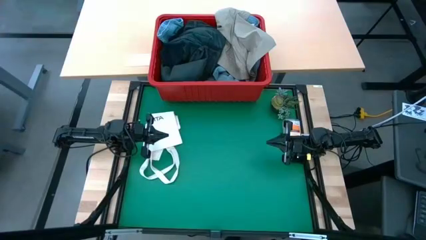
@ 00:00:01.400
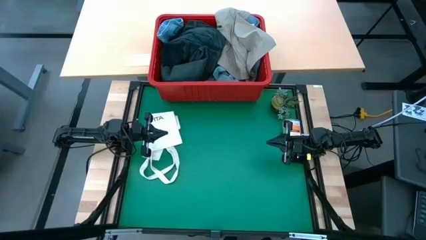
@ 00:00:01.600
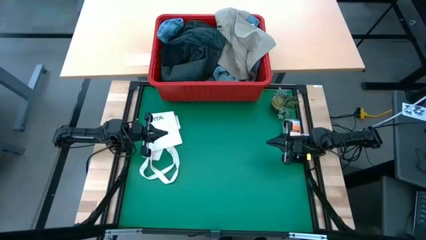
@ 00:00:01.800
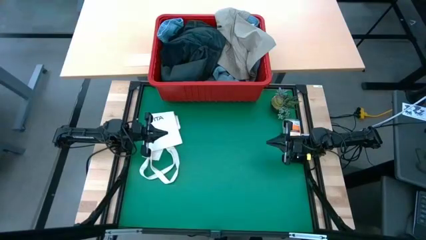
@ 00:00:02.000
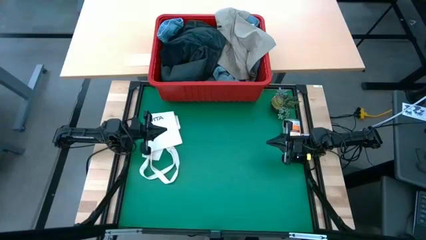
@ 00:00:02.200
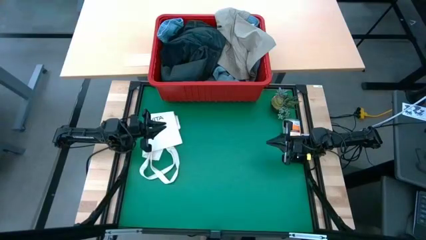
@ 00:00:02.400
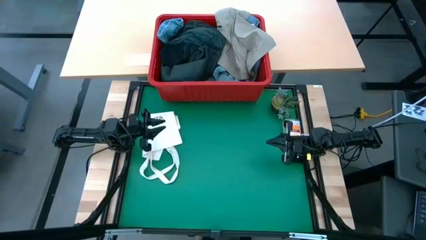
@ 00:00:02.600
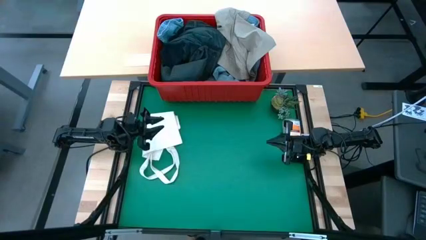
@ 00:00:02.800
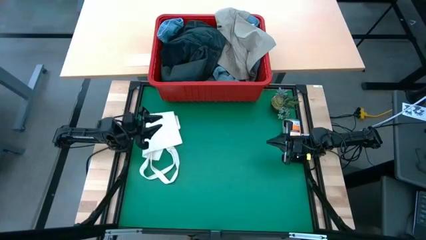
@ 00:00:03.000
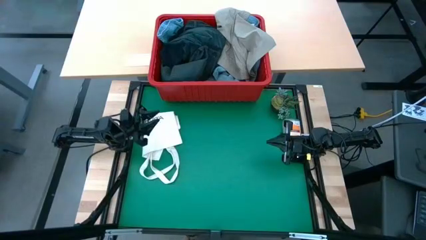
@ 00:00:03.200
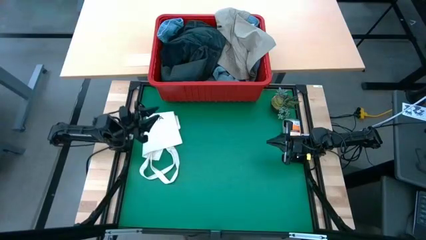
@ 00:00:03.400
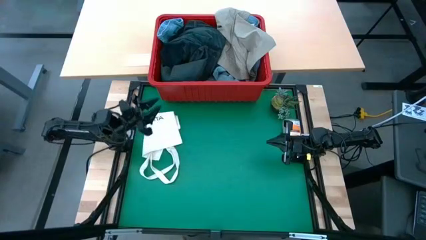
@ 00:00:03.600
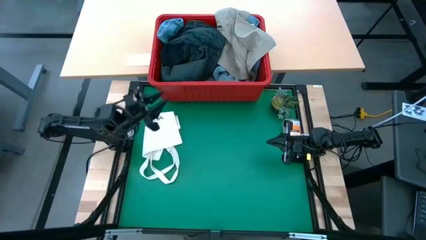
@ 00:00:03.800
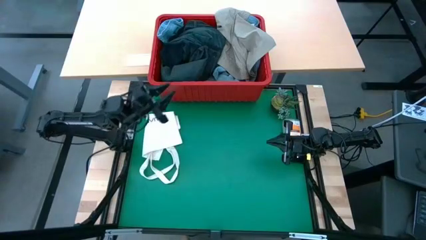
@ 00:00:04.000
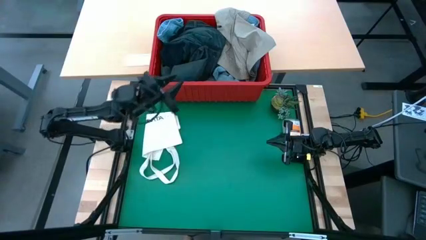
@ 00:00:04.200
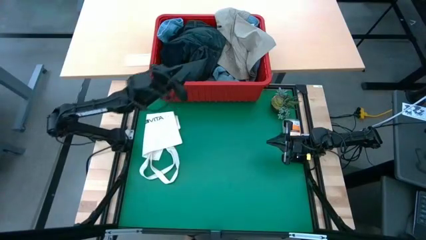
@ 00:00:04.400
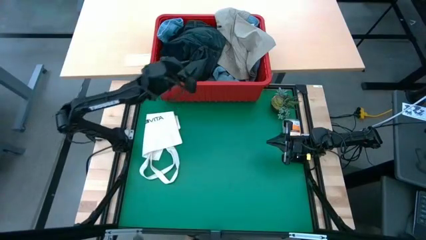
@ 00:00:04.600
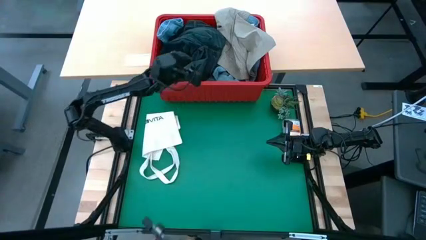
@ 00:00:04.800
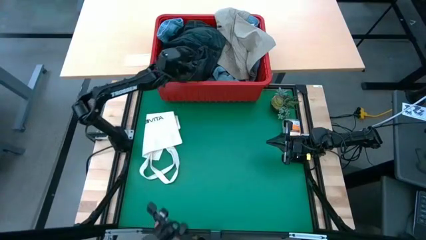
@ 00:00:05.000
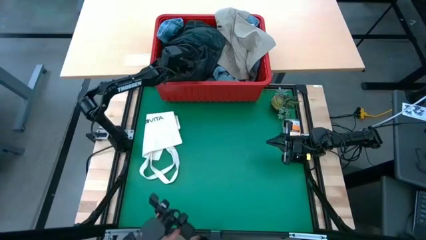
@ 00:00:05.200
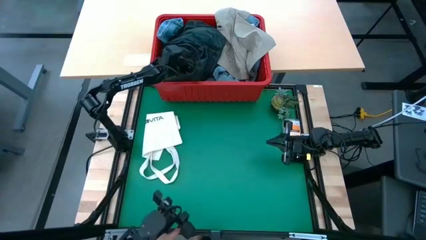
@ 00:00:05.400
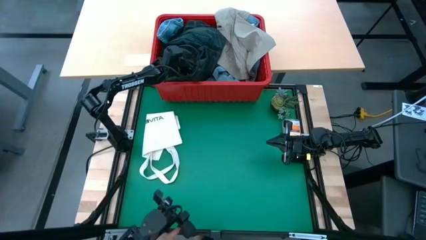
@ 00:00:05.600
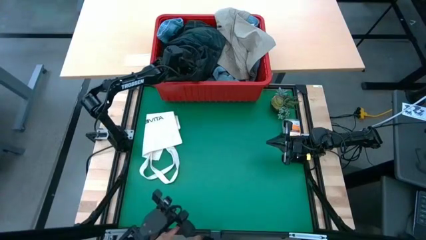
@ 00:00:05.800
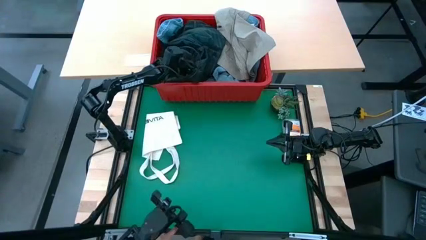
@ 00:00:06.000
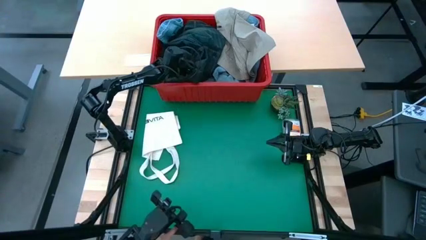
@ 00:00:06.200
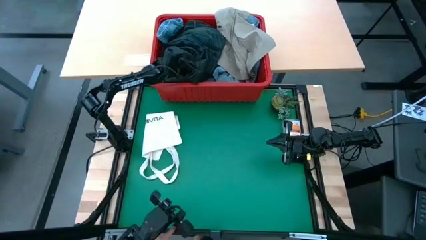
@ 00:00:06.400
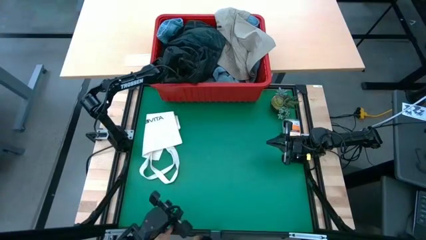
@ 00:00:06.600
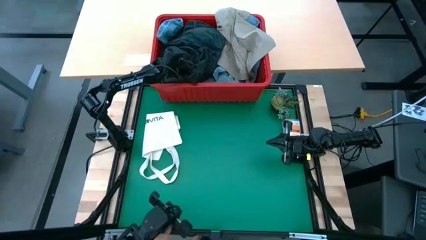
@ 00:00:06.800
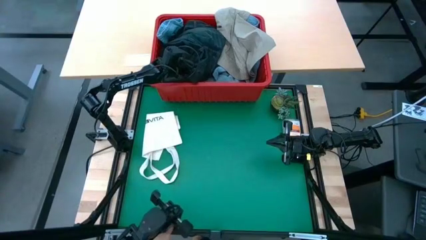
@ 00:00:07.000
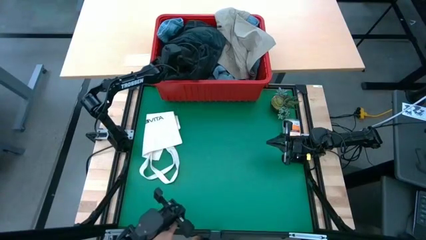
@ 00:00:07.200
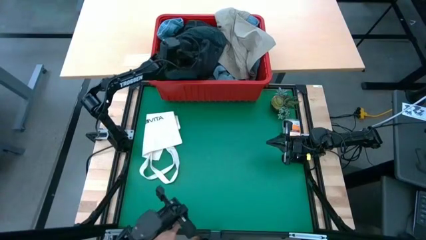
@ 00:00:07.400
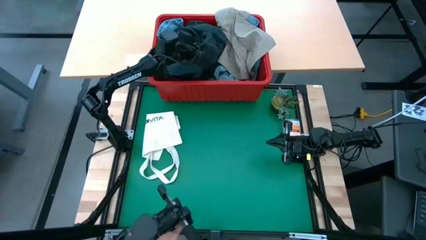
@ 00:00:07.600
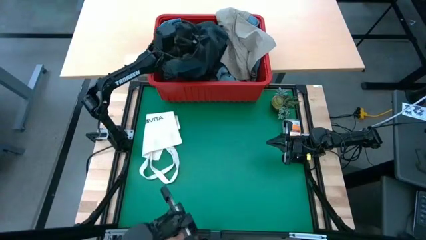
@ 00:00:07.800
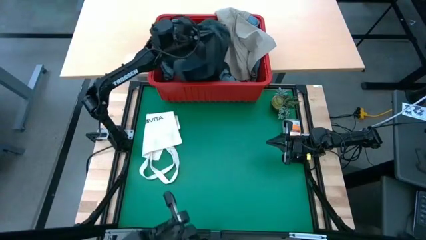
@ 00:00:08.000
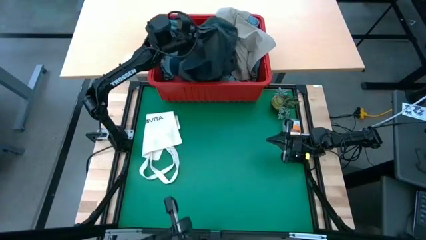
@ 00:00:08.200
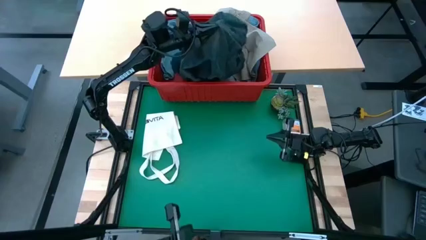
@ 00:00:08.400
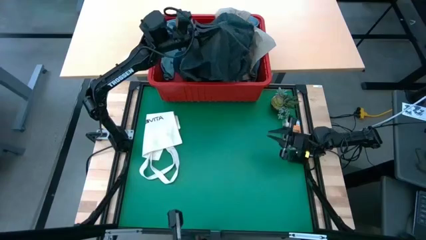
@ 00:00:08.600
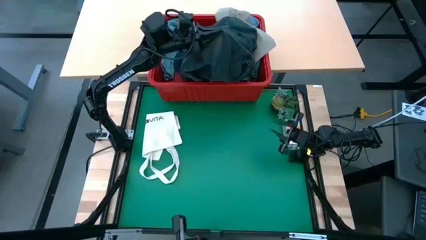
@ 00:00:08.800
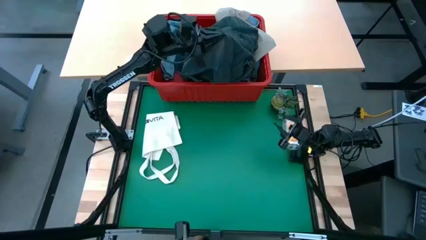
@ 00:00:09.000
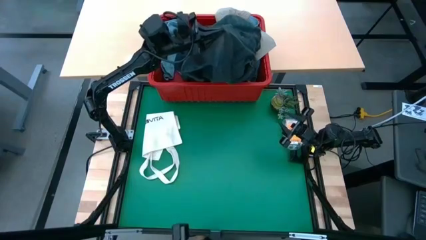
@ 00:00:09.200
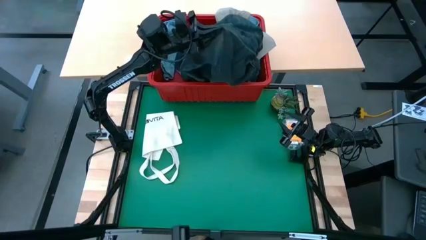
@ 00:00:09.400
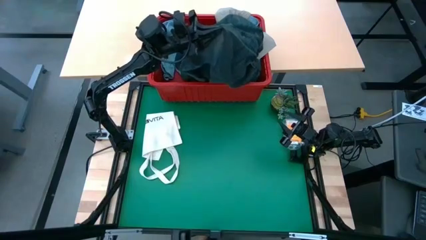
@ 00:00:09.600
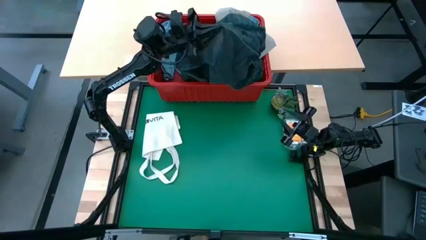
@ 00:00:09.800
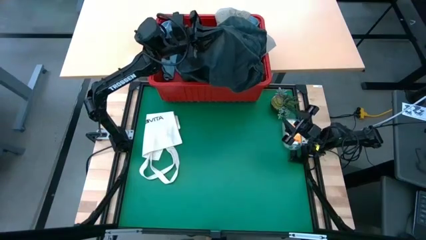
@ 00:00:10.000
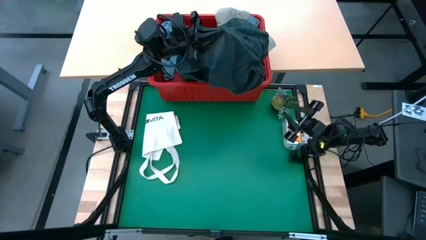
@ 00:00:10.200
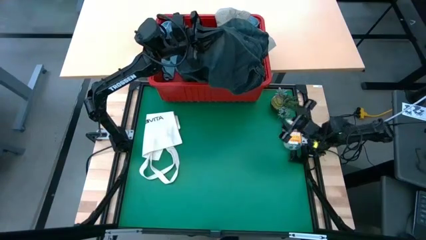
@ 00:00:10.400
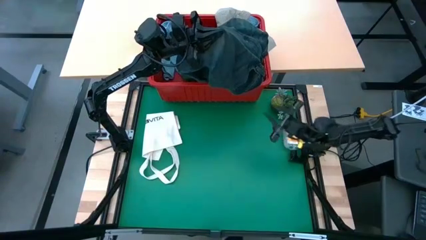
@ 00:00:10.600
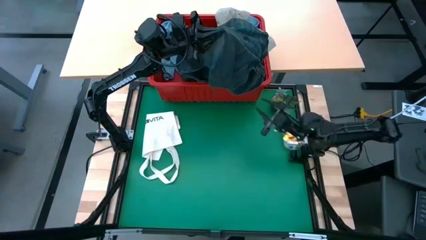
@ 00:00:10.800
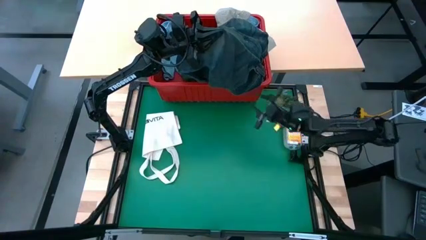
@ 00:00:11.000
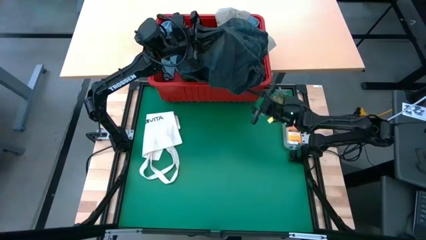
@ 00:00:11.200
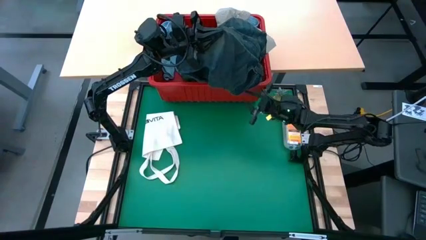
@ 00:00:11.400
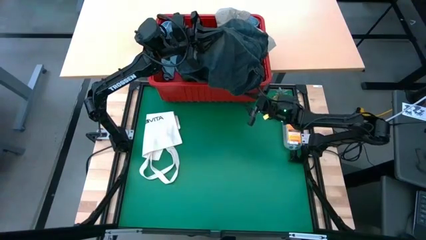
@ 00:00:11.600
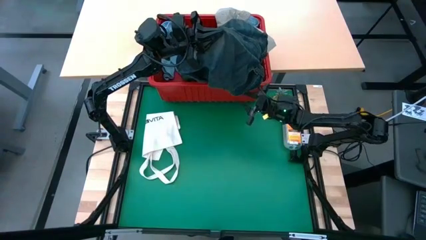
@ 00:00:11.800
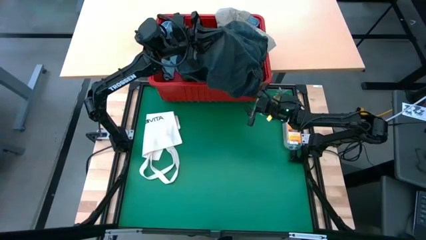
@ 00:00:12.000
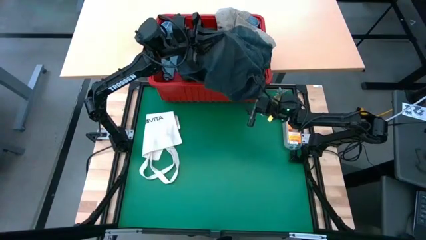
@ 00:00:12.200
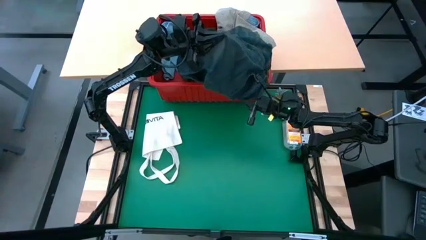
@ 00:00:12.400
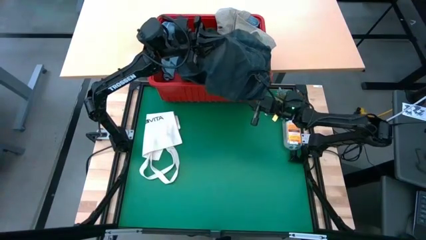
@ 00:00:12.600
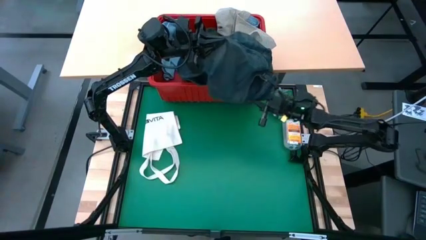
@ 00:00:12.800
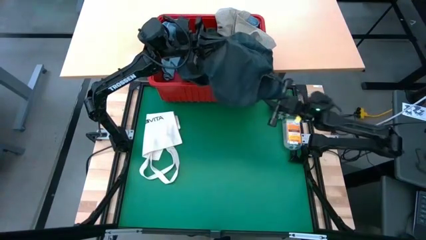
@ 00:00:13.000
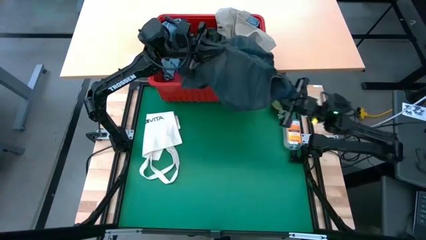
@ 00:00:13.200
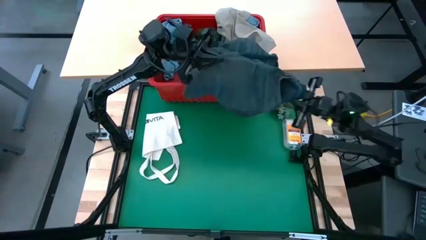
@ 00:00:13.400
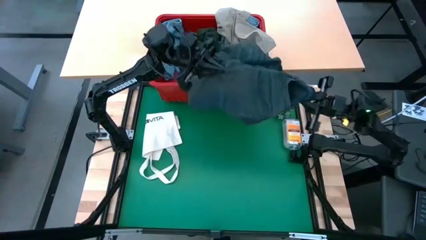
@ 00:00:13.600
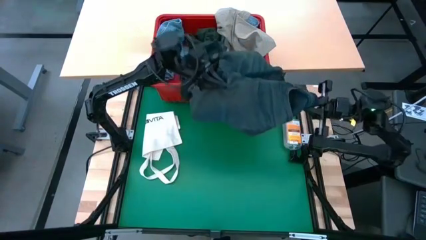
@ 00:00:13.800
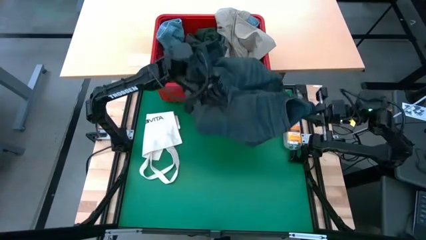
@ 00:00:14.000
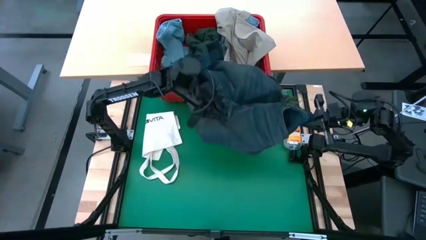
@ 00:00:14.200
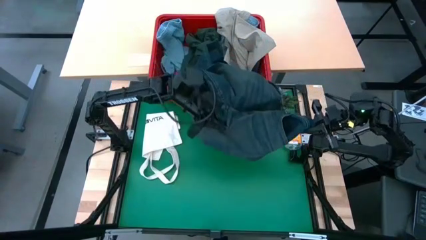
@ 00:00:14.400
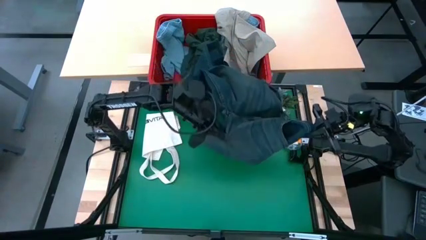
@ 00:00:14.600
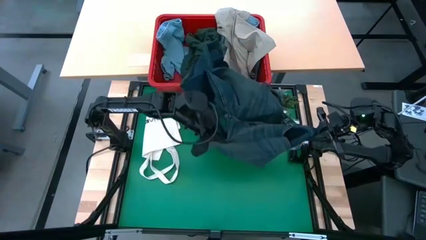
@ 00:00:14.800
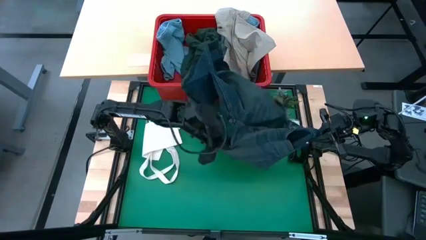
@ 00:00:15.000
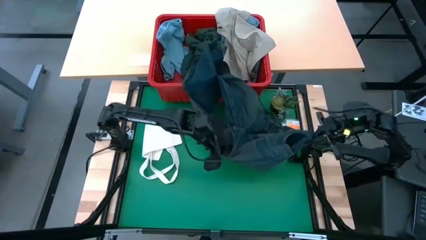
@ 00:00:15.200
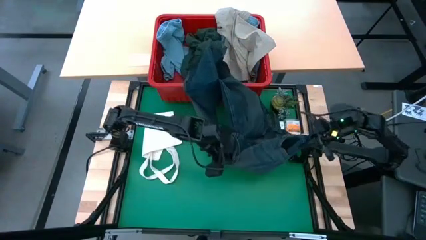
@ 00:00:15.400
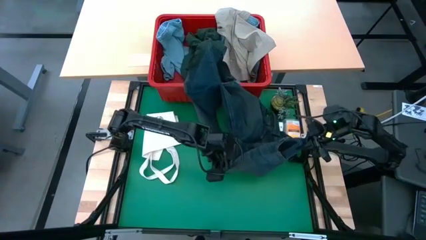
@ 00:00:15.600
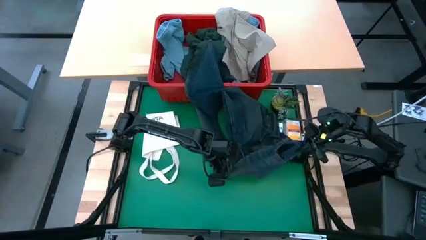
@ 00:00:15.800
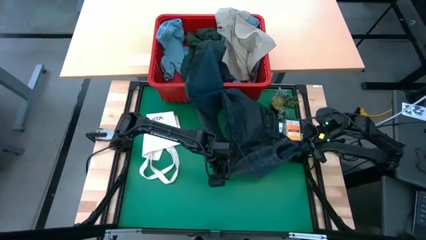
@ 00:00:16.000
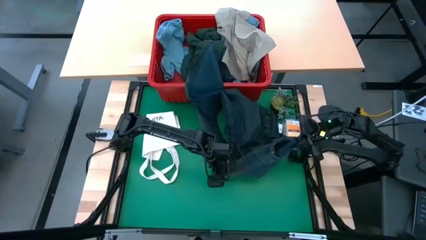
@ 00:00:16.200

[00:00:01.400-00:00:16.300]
Task: Fold laundry
Remove the dark blue pants from the laundry bin
